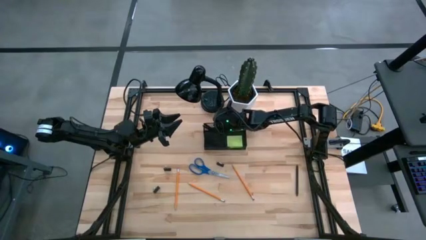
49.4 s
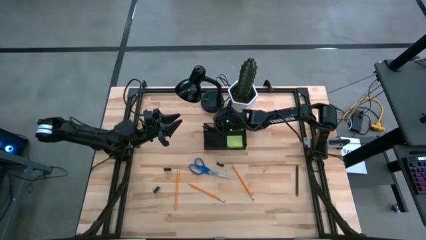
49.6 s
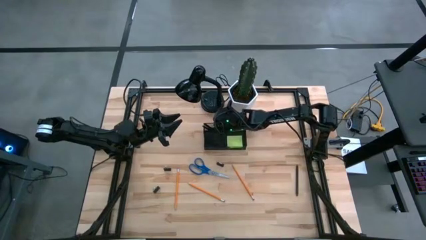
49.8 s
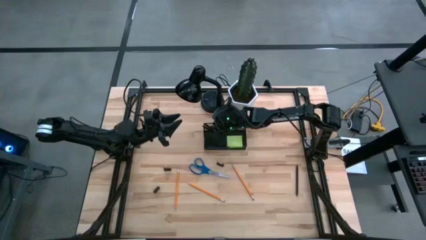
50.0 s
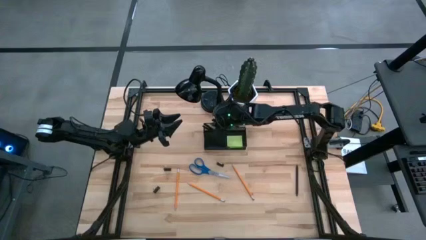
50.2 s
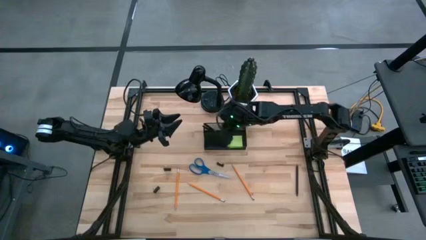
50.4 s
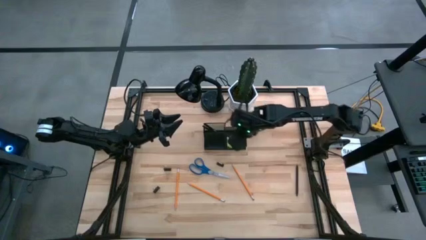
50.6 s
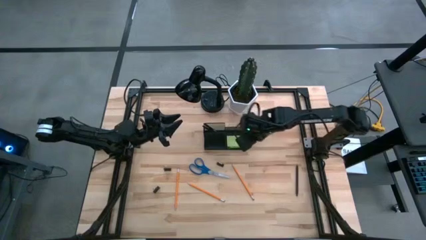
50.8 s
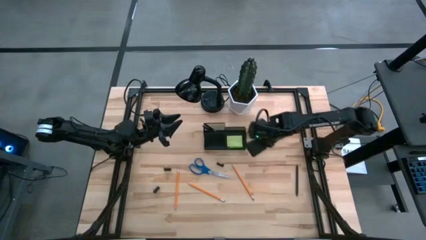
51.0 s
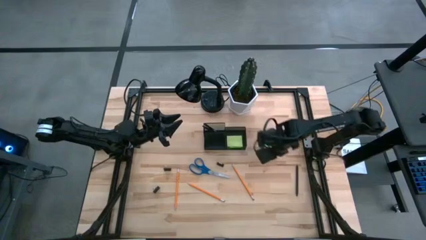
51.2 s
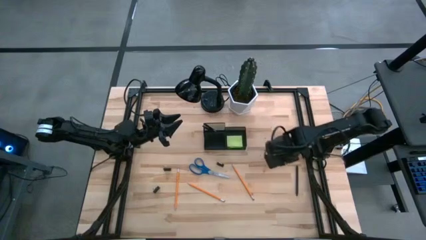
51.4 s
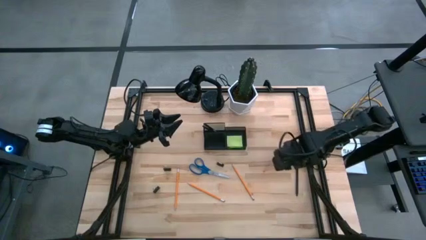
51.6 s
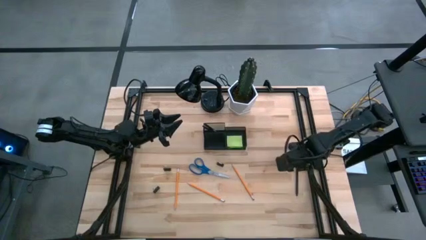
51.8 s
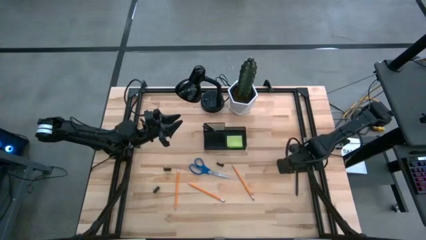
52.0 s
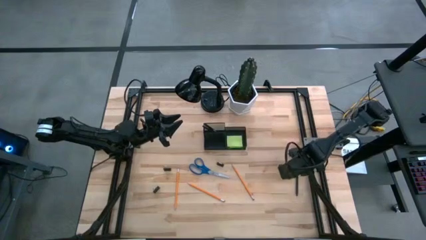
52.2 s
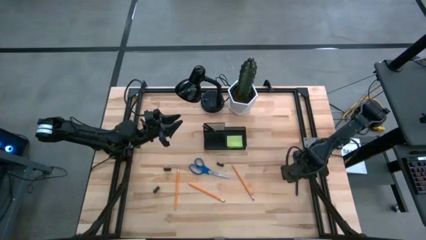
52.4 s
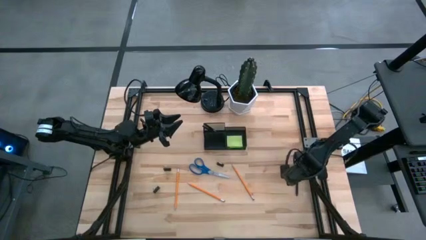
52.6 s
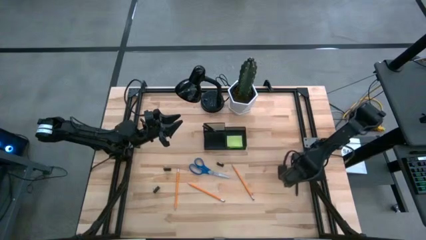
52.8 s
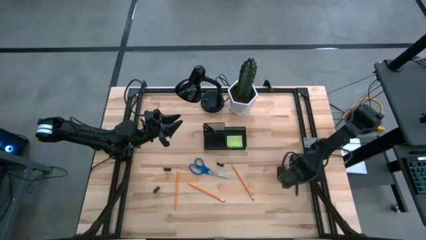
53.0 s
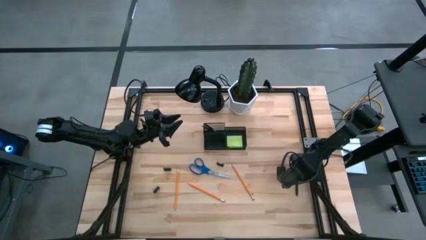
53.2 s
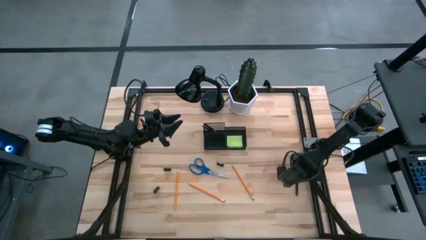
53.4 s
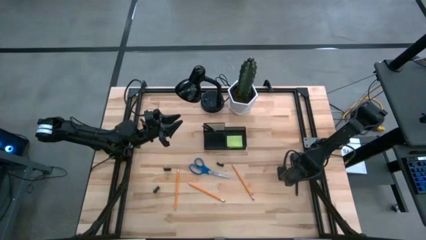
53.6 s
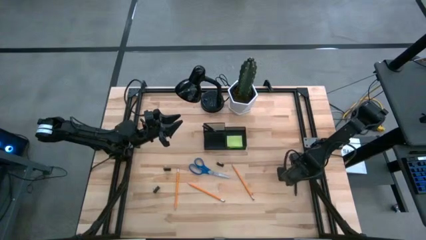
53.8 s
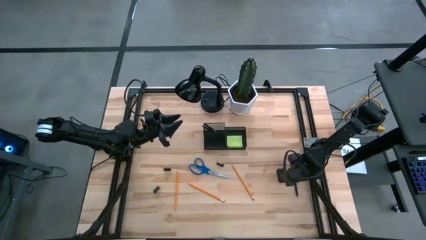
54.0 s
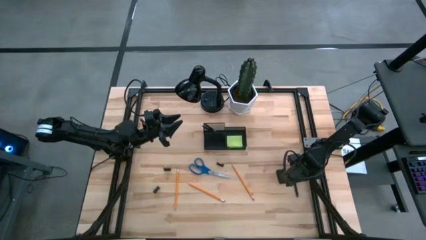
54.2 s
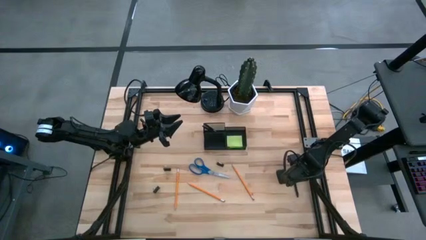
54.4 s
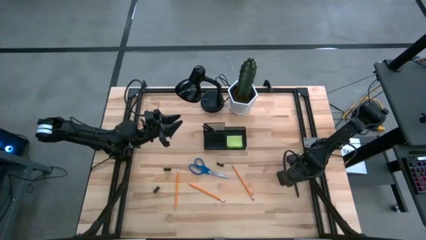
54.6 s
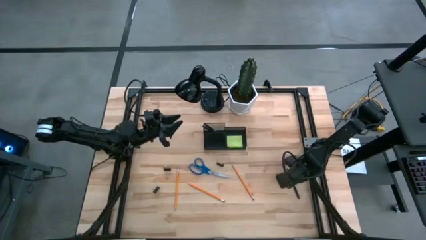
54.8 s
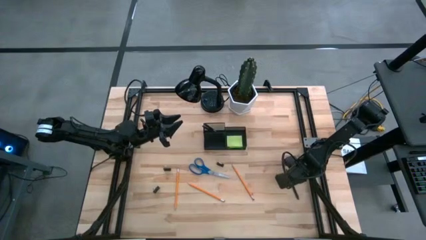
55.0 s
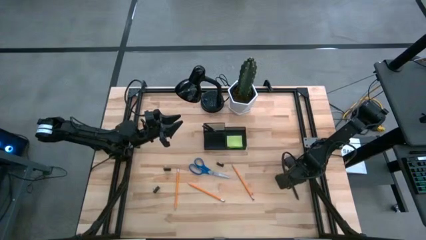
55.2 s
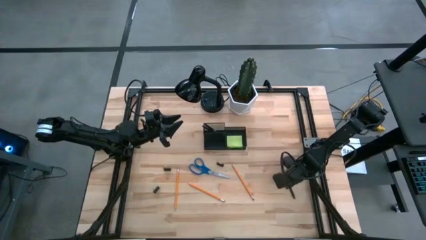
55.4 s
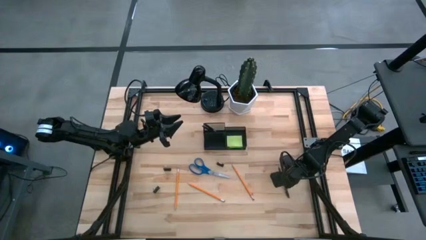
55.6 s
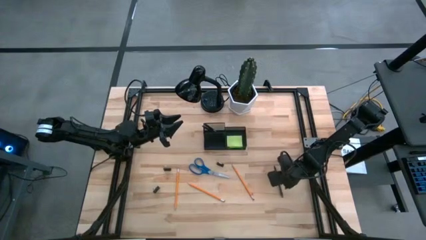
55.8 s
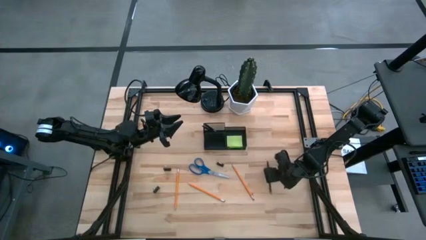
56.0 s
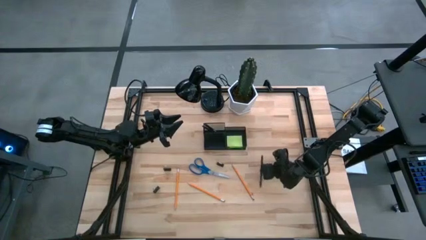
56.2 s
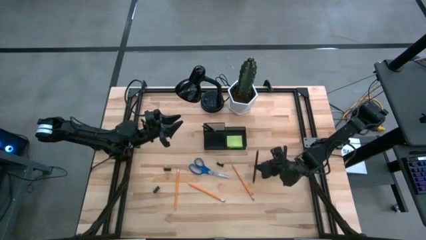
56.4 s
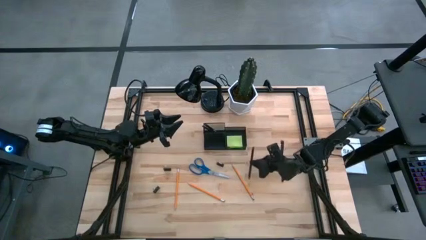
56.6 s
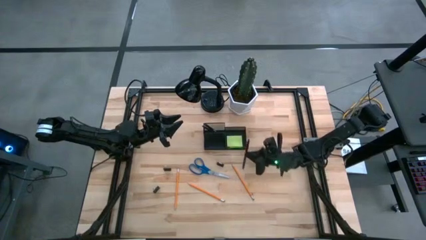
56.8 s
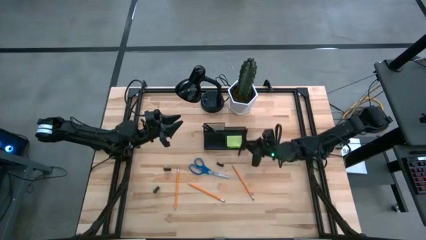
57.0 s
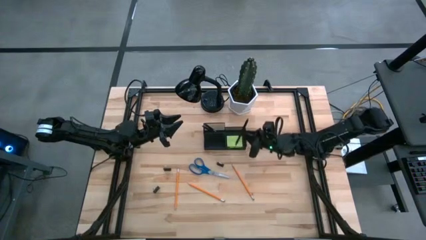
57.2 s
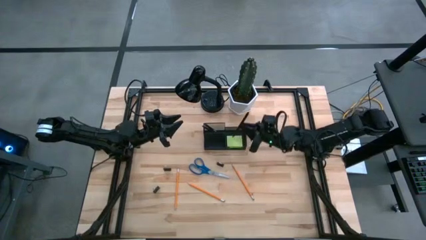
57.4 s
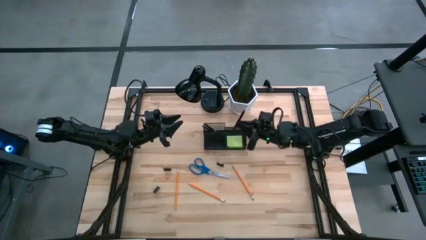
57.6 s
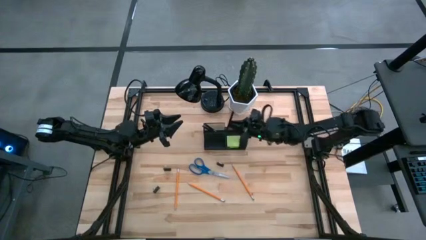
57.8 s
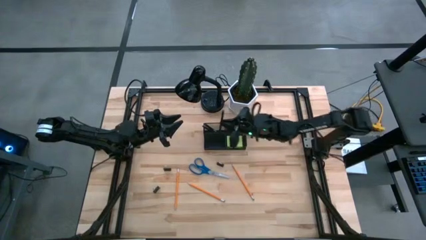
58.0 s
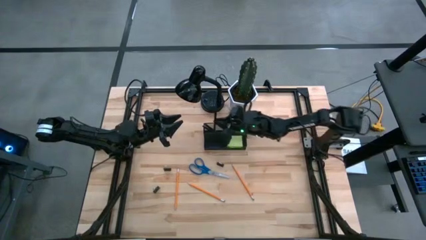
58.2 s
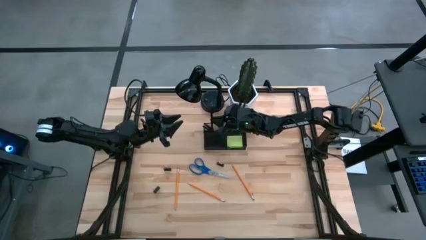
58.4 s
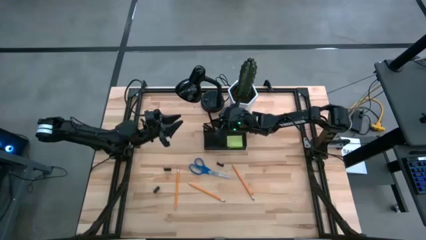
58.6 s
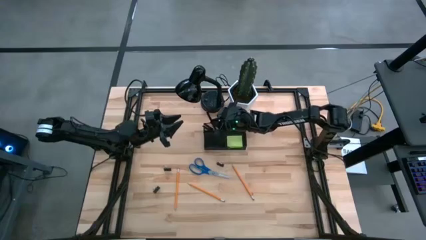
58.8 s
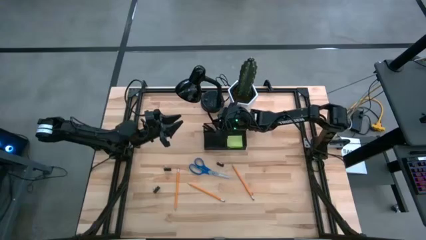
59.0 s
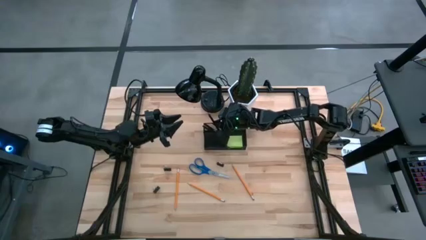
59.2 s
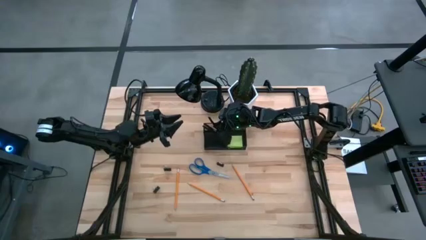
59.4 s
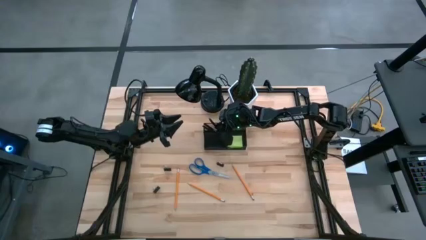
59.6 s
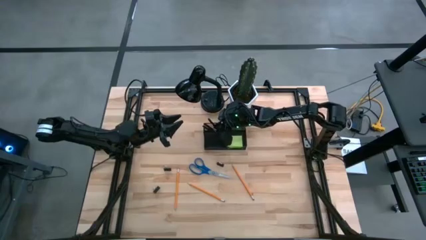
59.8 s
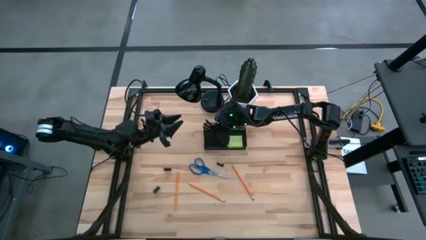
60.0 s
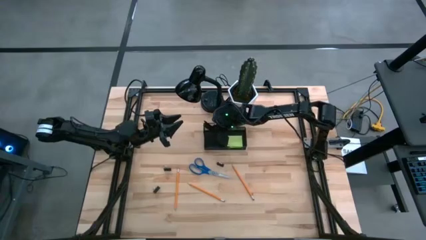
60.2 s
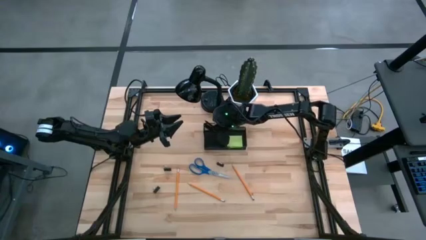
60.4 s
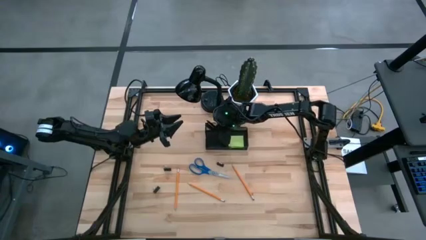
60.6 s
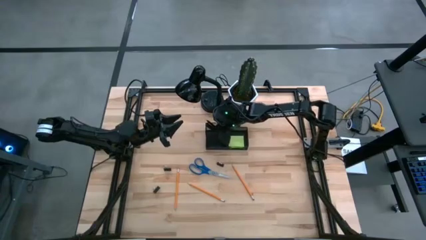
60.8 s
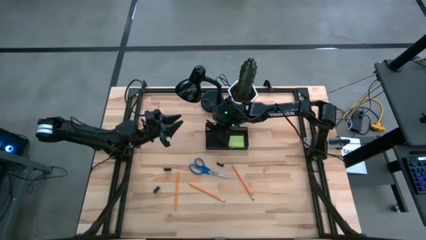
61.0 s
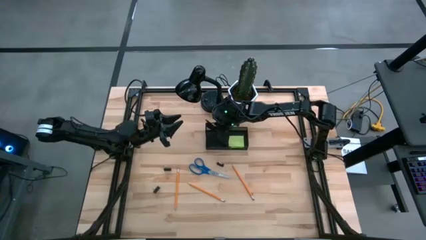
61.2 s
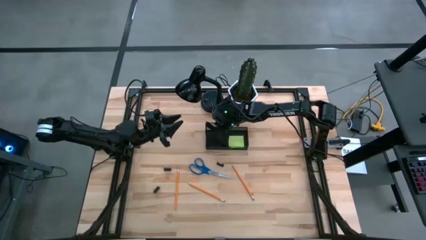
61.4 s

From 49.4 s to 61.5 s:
Task: Pick and place office supplies into organizer
Put the black pen into the mesh desk organizer
